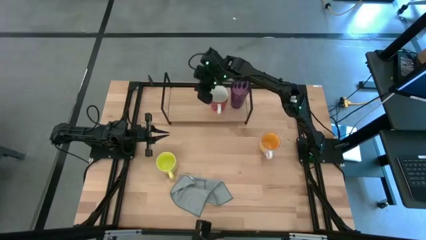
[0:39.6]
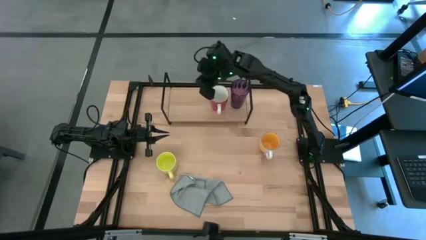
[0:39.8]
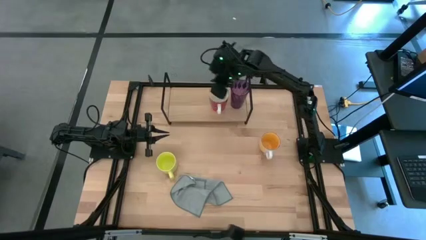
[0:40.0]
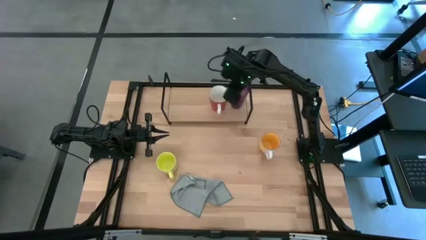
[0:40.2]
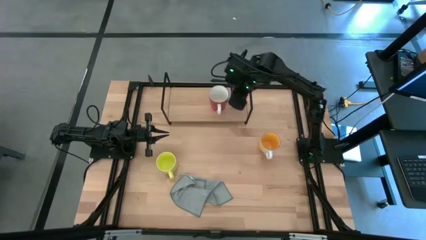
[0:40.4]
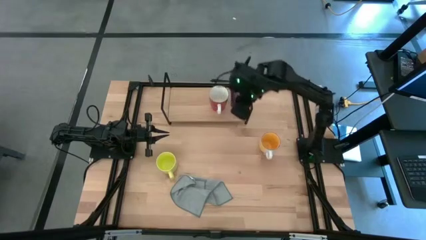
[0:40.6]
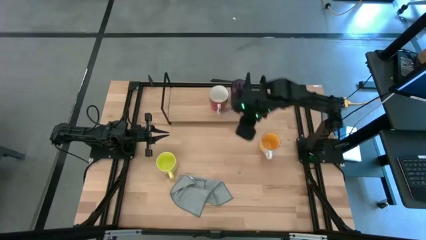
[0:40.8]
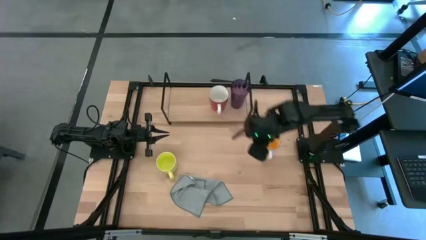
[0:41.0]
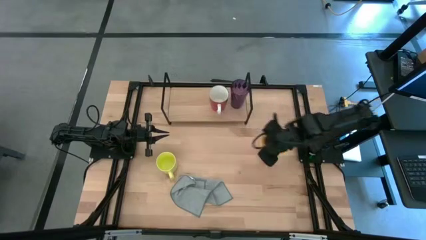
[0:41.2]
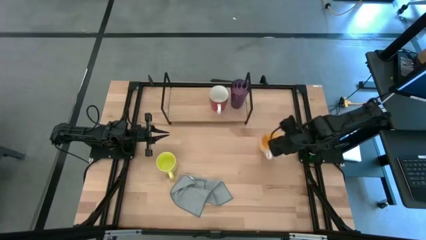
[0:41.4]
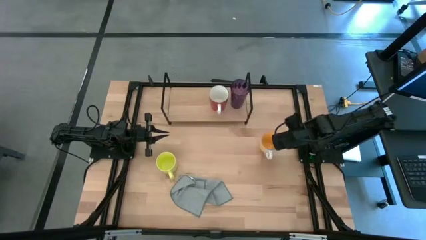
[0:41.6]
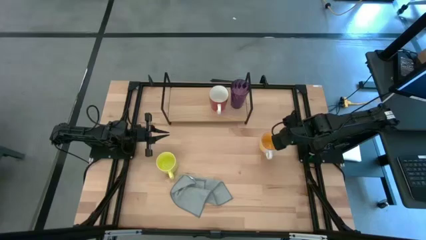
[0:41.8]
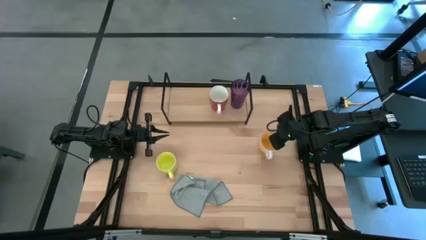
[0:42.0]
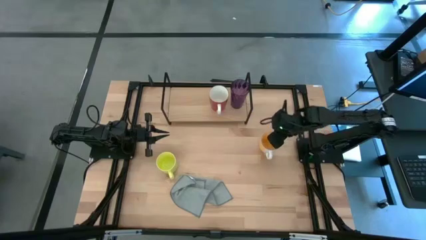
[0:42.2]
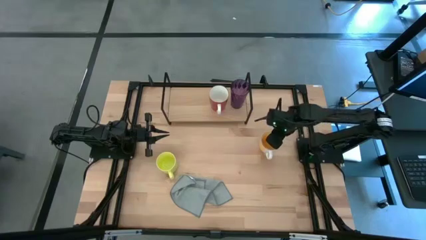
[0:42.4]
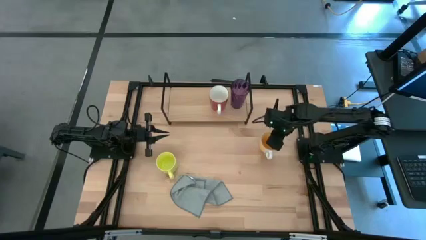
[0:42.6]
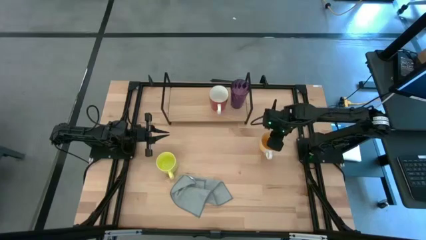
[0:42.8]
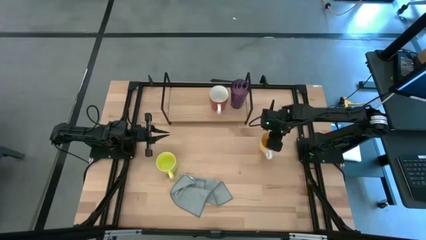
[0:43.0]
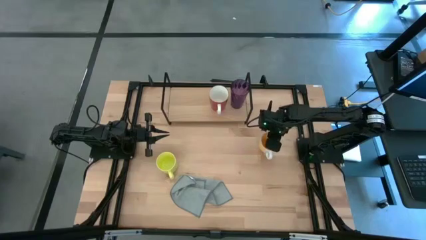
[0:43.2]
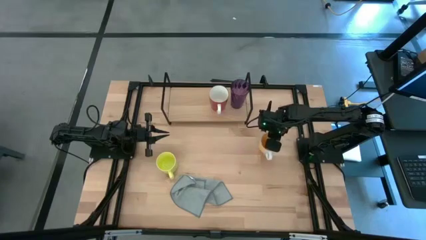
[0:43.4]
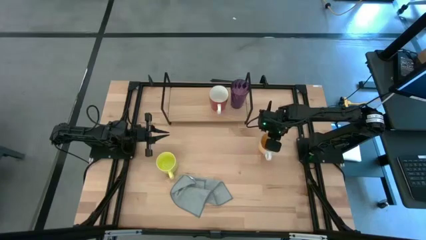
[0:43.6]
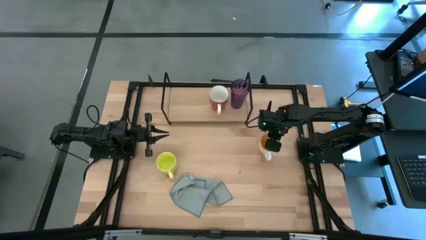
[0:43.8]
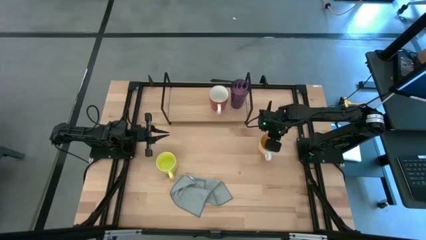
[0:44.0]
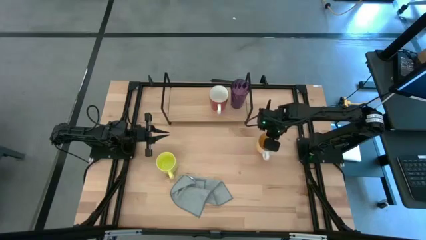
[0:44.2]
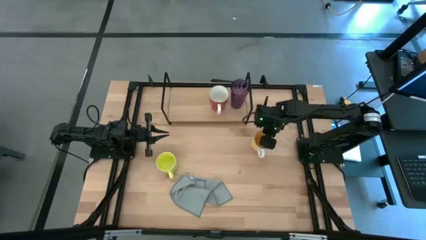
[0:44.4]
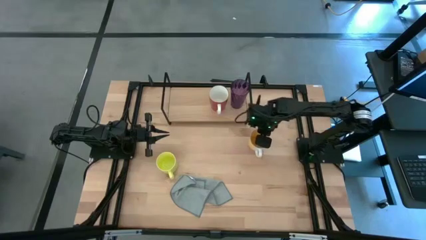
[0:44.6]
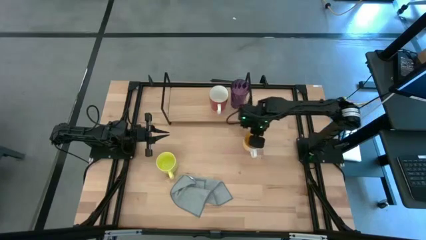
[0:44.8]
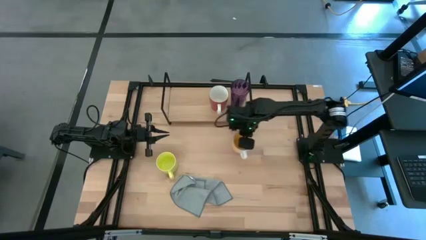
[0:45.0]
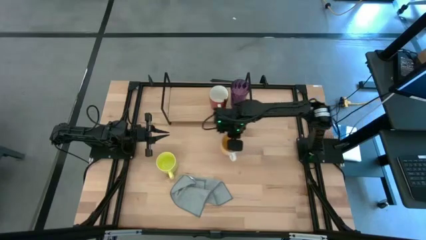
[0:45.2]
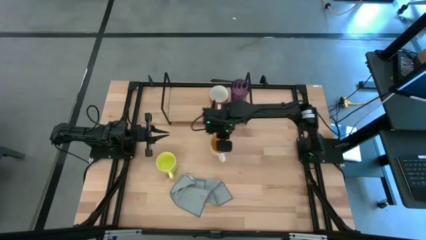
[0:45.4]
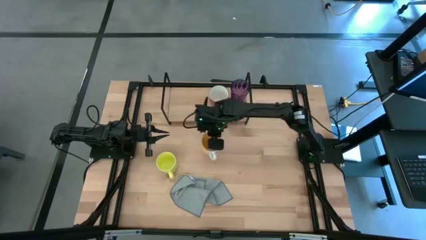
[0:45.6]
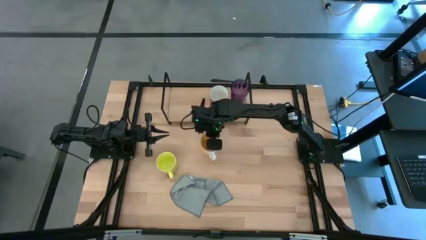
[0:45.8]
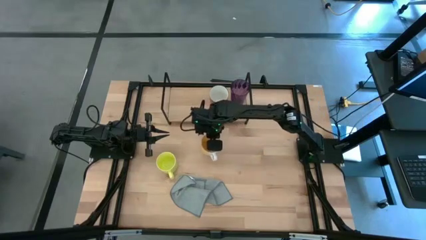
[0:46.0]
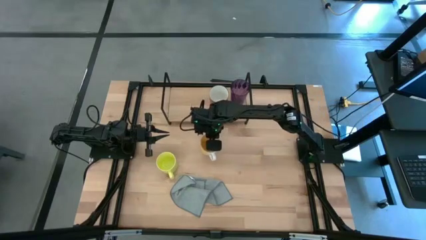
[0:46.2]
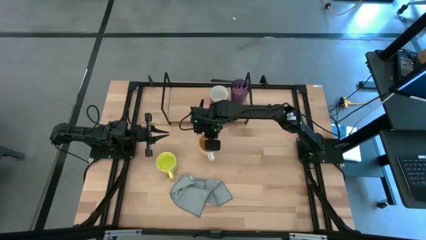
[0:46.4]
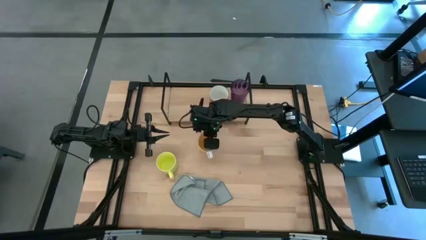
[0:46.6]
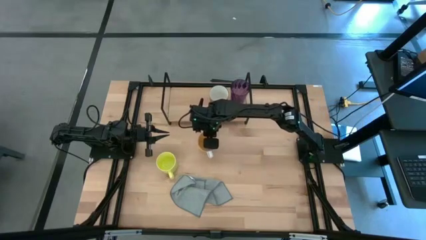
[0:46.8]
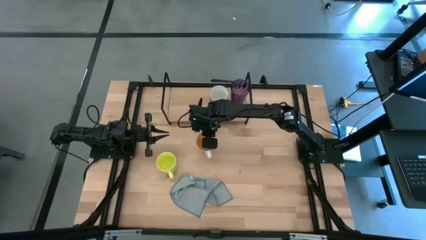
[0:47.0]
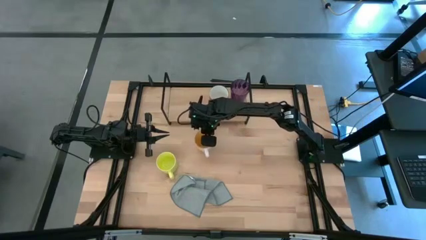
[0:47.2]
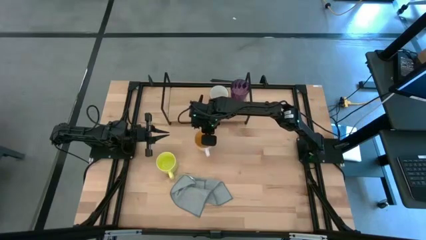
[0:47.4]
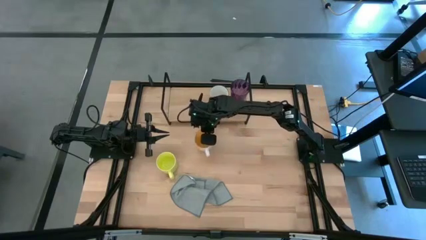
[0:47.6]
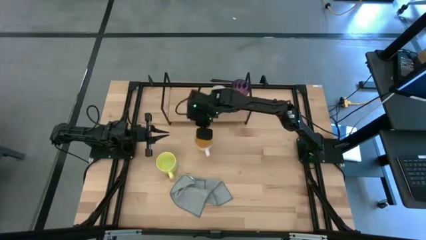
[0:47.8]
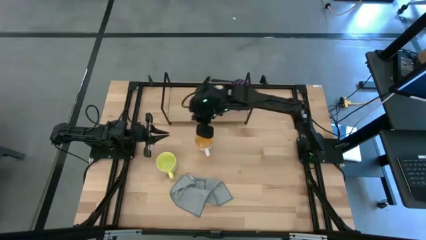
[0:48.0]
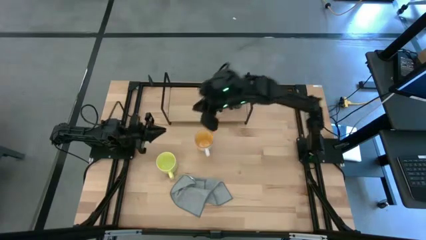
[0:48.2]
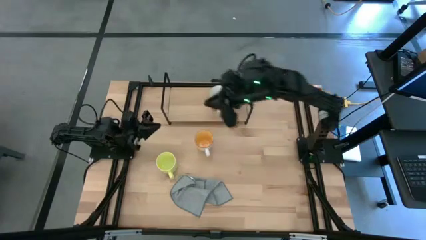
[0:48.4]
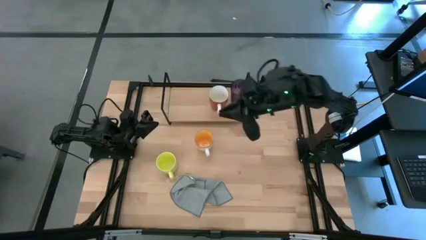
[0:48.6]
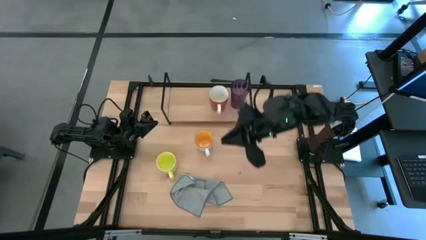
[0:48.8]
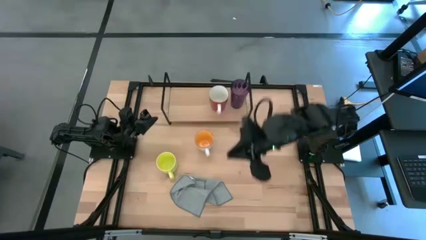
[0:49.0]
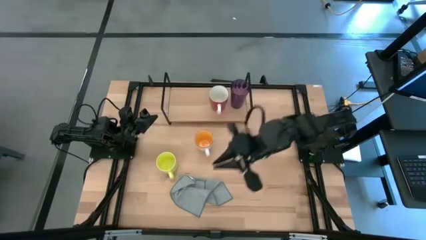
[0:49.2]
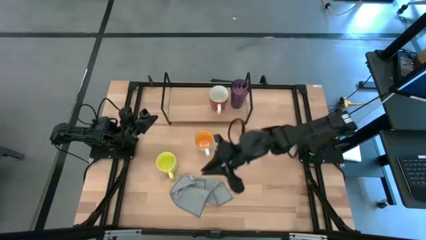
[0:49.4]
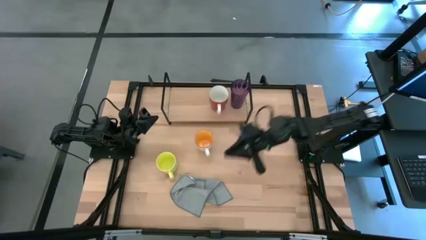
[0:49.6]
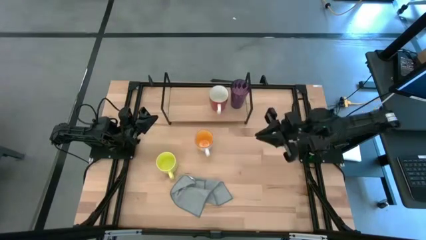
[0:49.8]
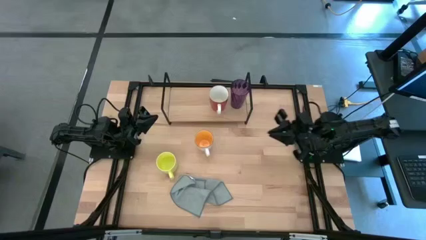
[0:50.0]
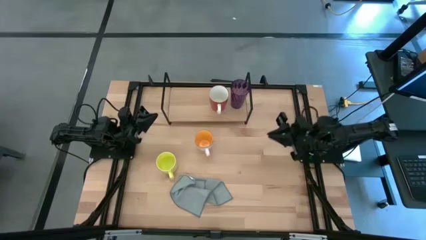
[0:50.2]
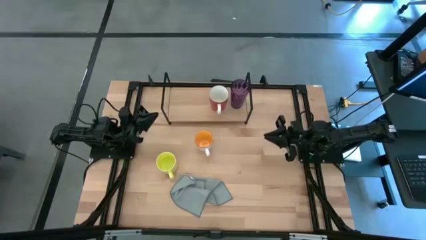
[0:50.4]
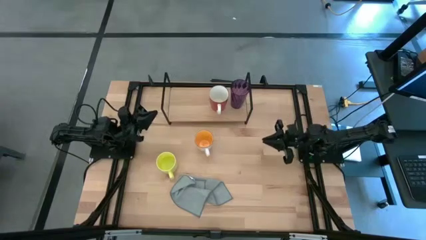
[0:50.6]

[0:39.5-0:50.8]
Task: Stack small to large cups/mugs on shelf
Put the yellow mug on the shelf

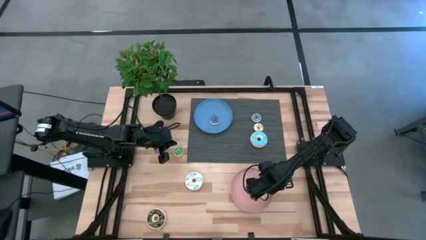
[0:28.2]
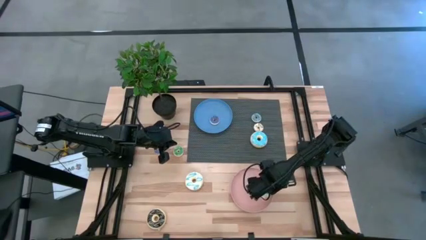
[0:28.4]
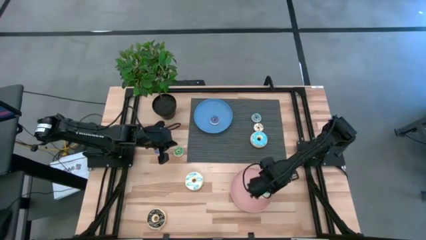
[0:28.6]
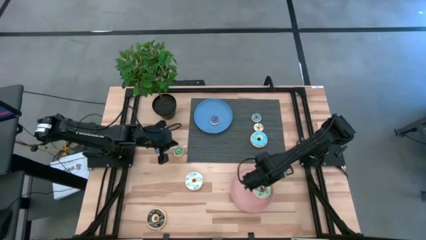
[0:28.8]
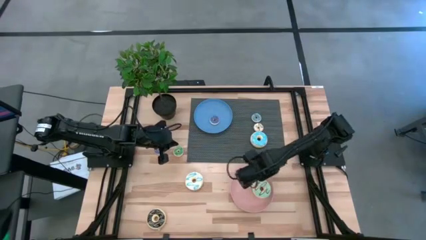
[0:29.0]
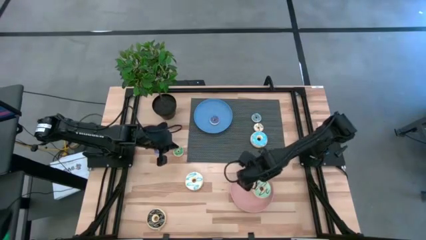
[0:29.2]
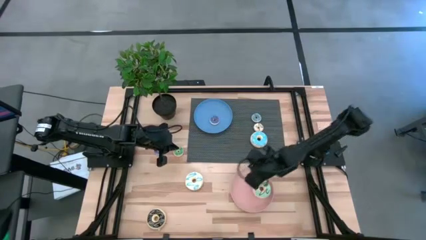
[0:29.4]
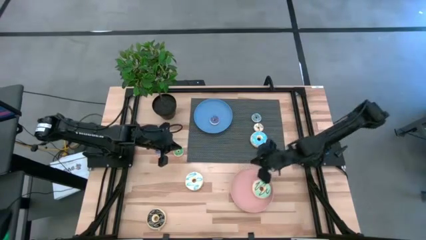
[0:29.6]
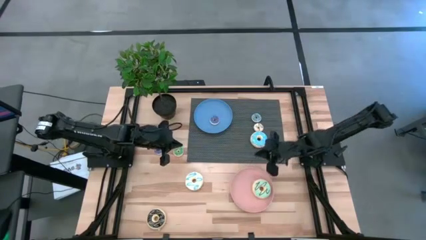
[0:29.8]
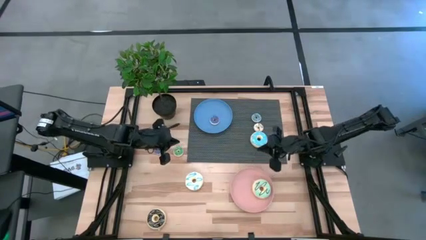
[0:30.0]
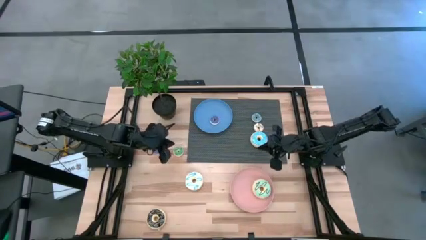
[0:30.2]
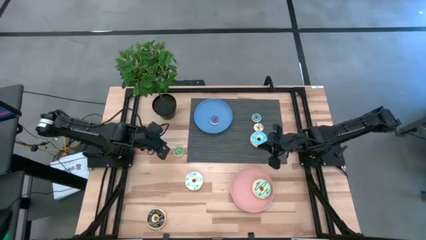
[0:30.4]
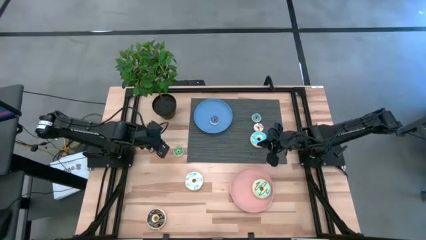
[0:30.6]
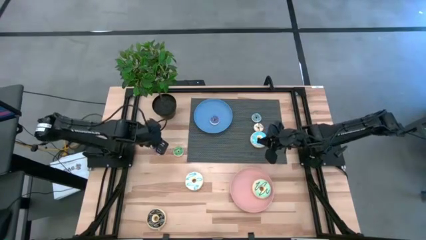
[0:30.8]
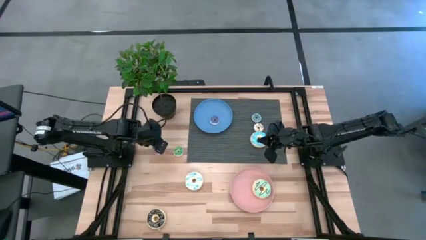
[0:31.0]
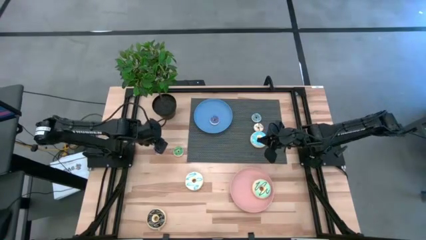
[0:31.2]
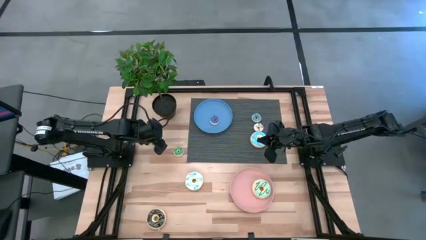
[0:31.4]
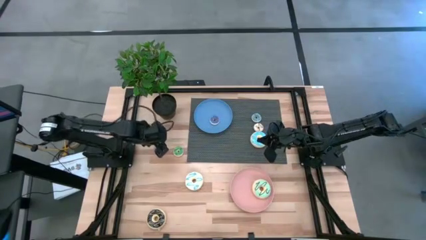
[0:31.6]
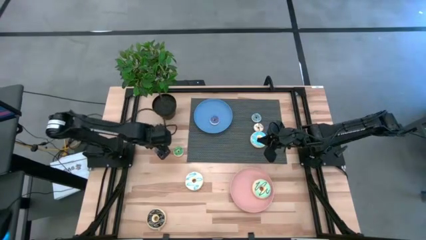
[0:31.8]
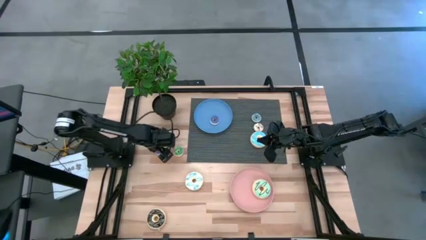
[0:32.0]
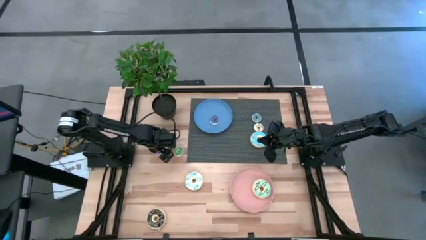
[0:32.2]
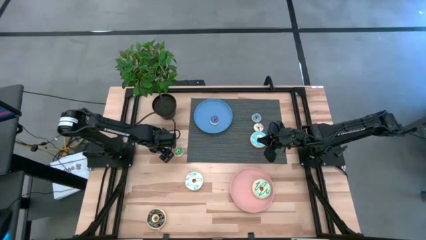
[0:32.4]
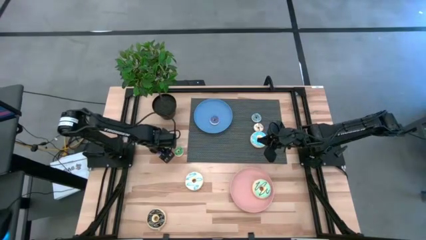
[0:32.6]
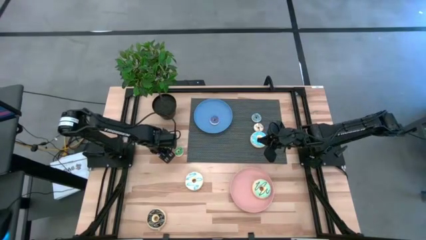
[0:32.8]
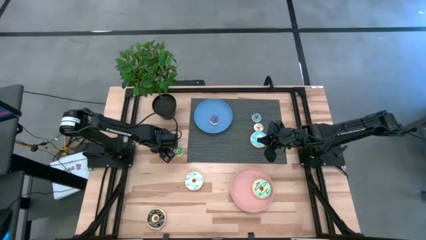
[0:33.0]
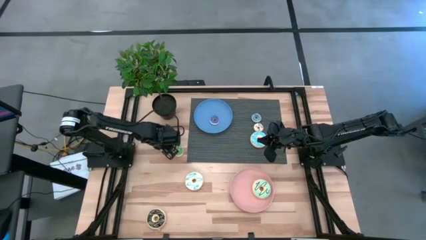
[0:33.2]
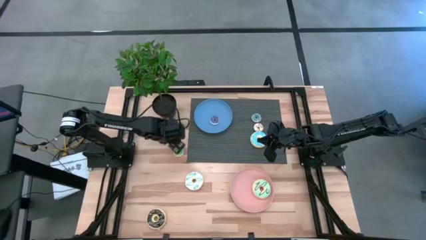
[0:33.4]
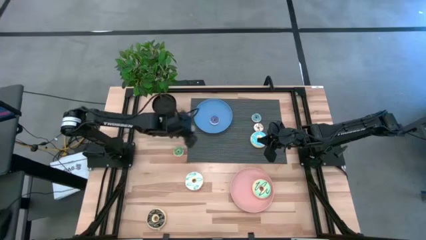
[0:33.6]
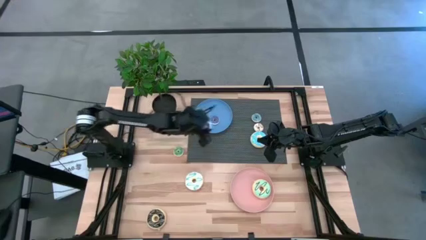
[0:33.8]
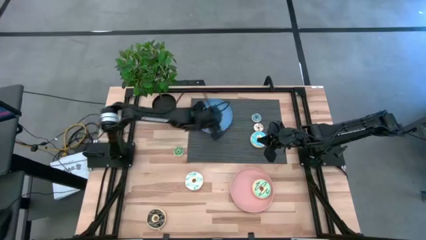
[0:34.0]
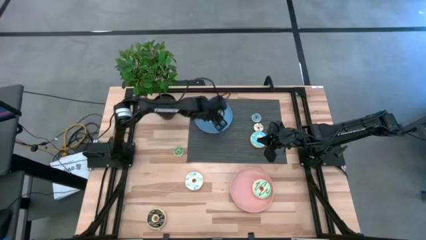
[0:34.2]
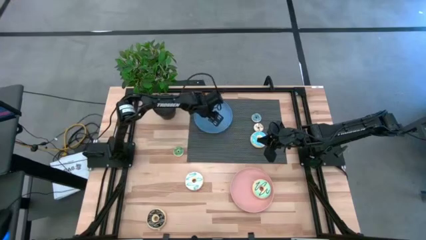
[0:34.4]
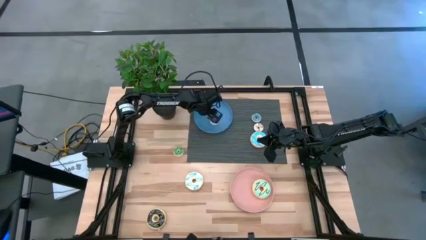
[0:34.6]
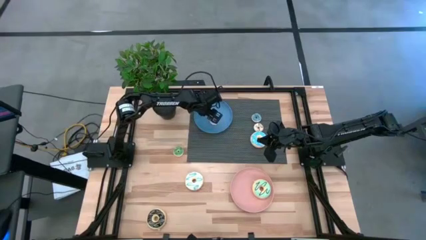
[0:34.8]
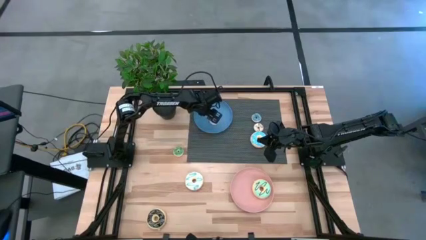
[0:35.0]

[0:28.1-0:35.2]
Task: Pick & Place donuts
Put the small blue donut into the blue plate
